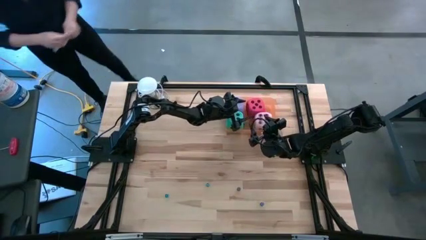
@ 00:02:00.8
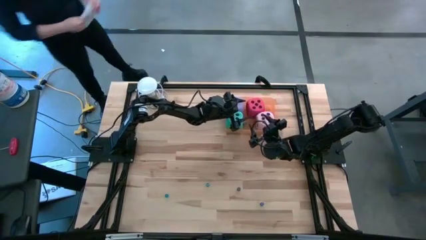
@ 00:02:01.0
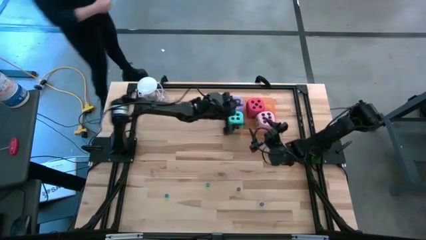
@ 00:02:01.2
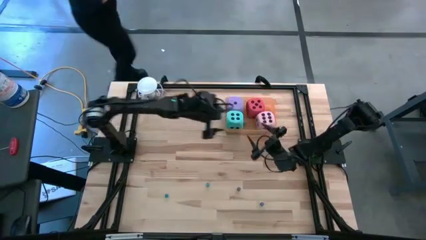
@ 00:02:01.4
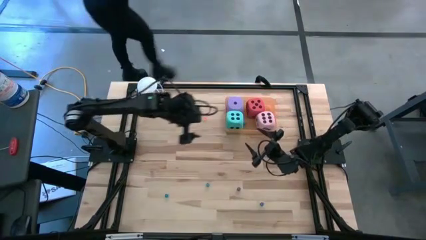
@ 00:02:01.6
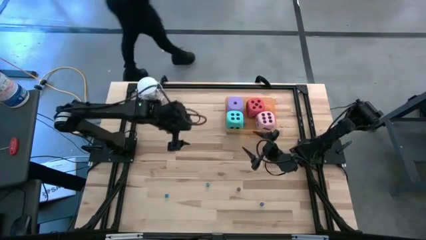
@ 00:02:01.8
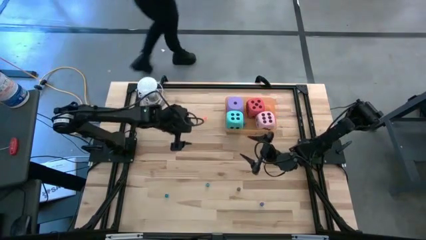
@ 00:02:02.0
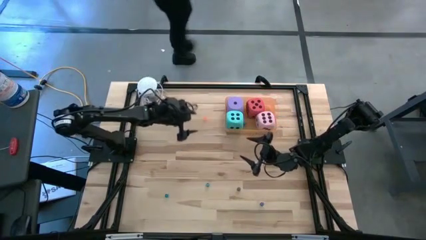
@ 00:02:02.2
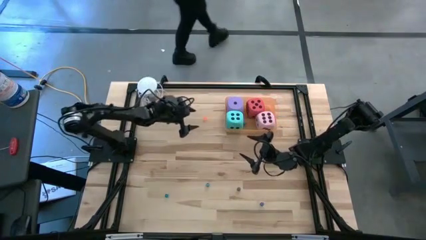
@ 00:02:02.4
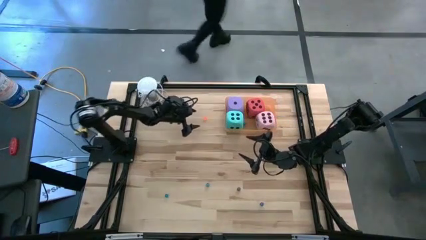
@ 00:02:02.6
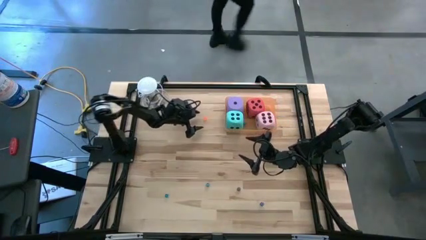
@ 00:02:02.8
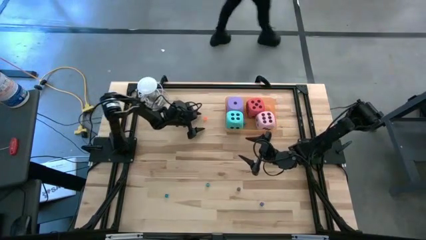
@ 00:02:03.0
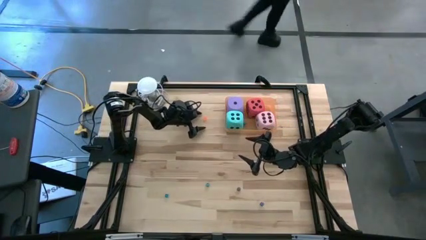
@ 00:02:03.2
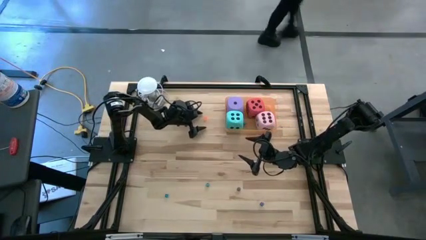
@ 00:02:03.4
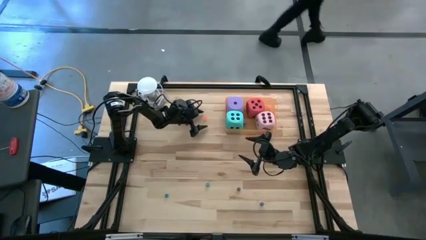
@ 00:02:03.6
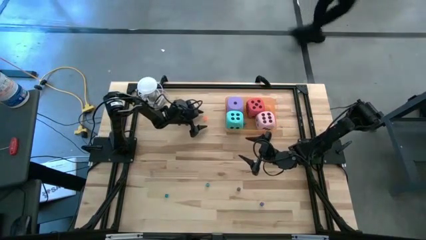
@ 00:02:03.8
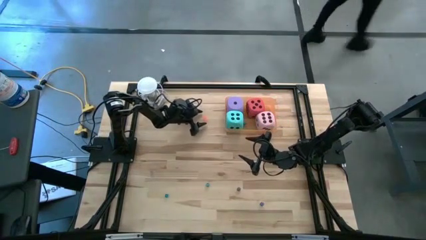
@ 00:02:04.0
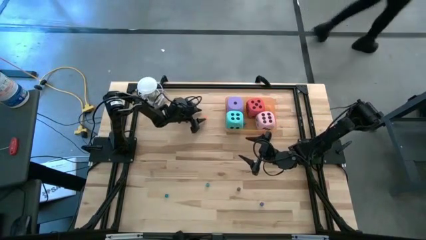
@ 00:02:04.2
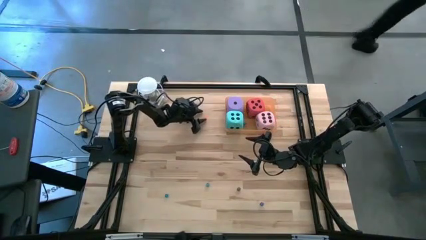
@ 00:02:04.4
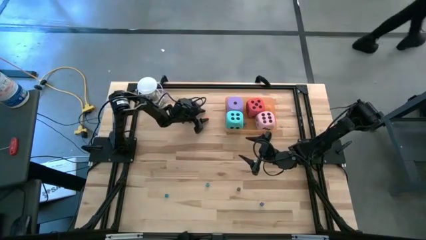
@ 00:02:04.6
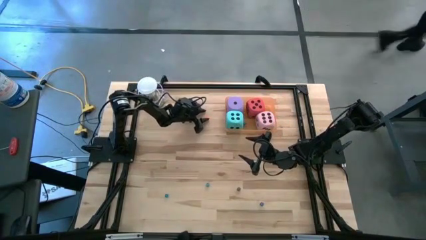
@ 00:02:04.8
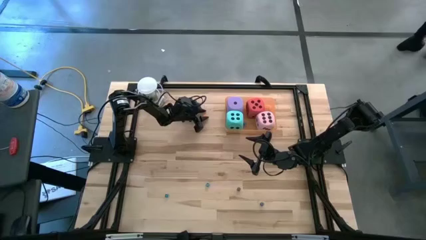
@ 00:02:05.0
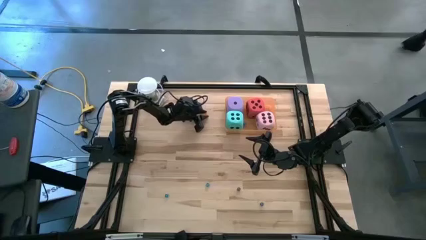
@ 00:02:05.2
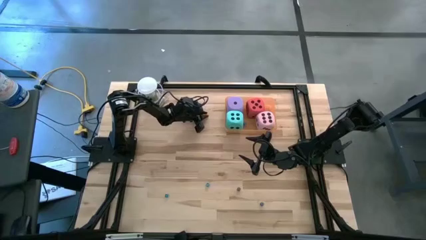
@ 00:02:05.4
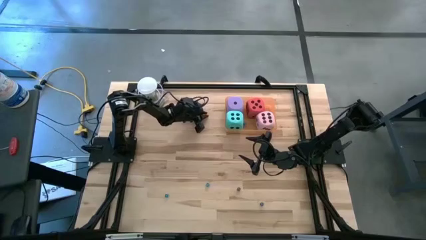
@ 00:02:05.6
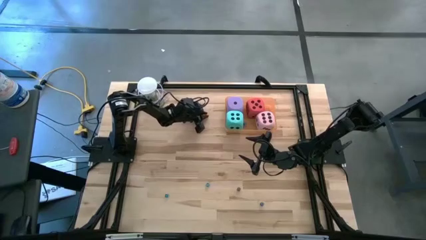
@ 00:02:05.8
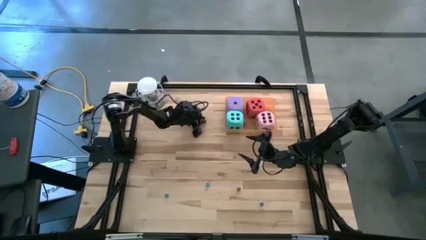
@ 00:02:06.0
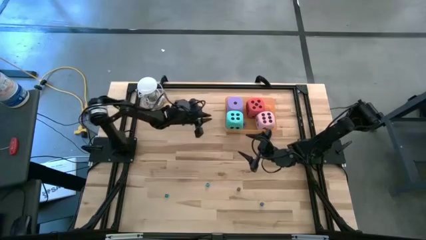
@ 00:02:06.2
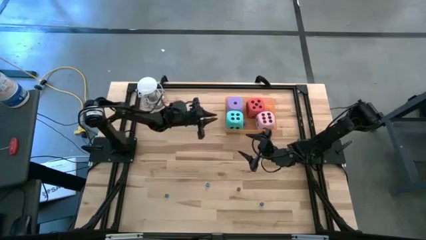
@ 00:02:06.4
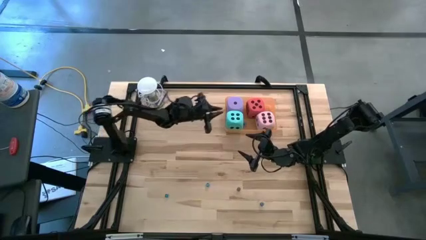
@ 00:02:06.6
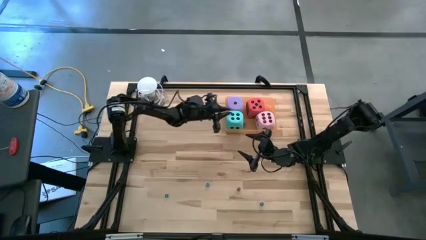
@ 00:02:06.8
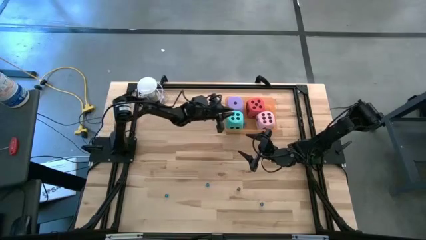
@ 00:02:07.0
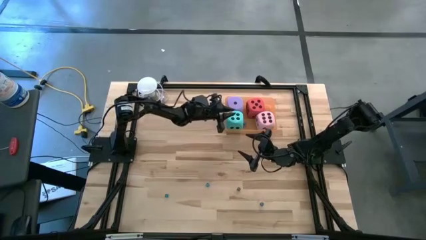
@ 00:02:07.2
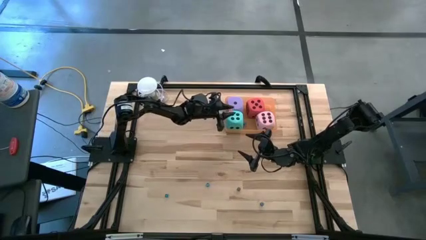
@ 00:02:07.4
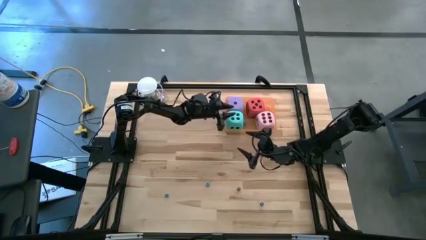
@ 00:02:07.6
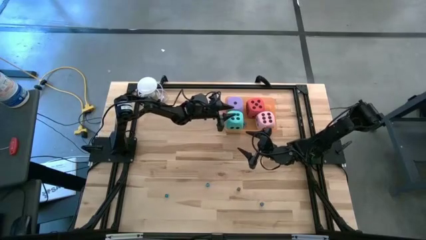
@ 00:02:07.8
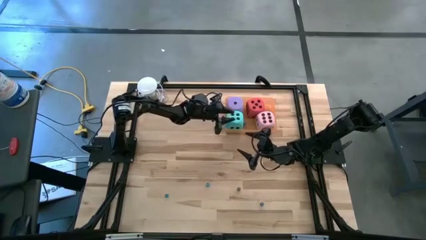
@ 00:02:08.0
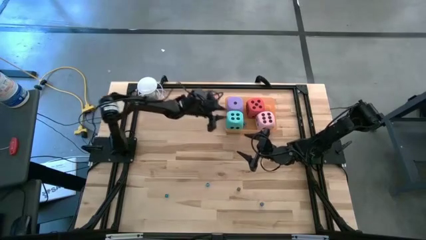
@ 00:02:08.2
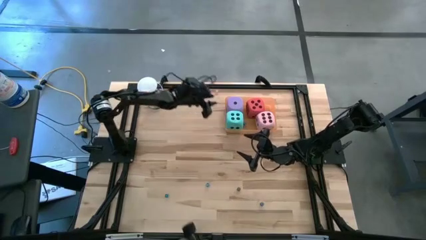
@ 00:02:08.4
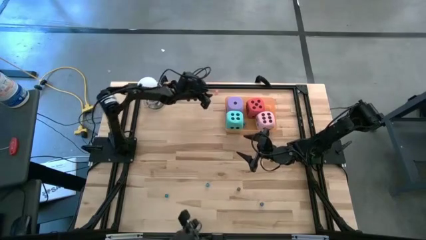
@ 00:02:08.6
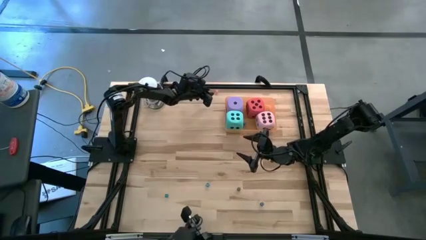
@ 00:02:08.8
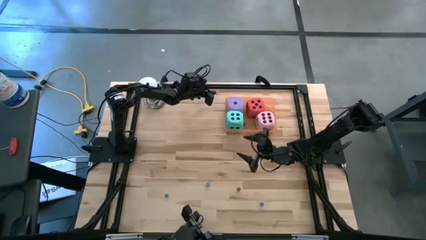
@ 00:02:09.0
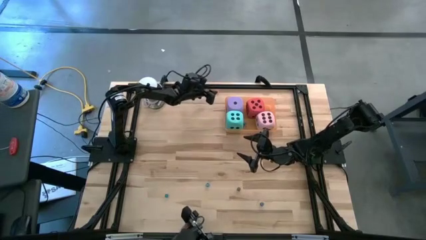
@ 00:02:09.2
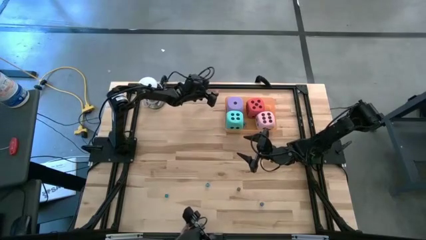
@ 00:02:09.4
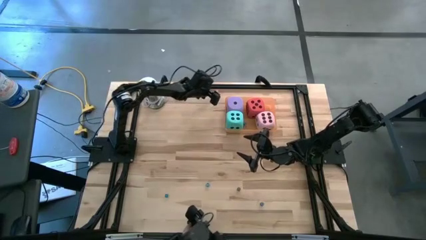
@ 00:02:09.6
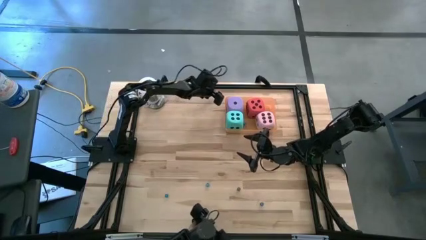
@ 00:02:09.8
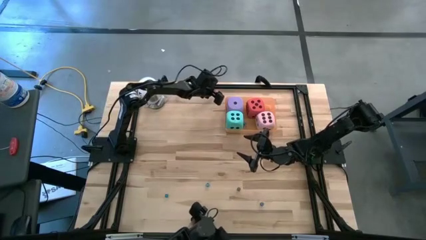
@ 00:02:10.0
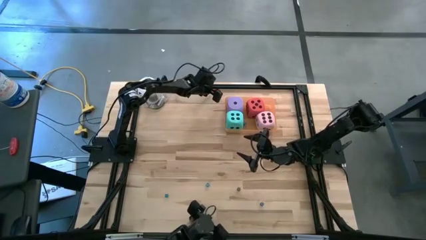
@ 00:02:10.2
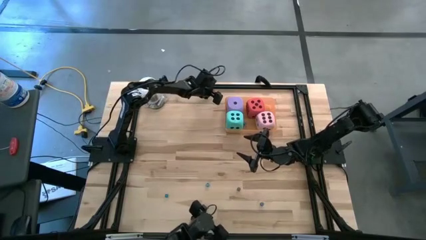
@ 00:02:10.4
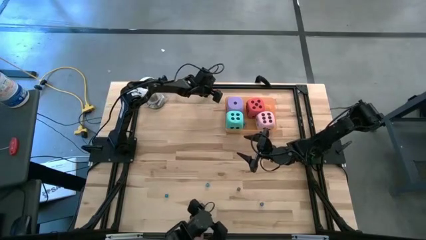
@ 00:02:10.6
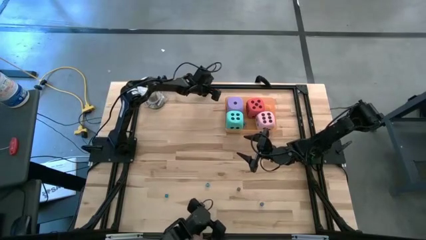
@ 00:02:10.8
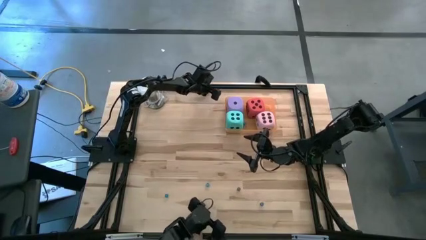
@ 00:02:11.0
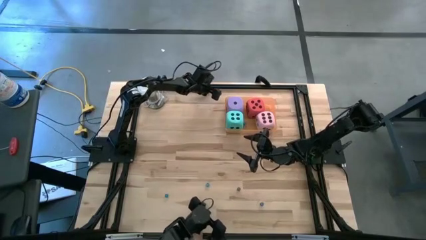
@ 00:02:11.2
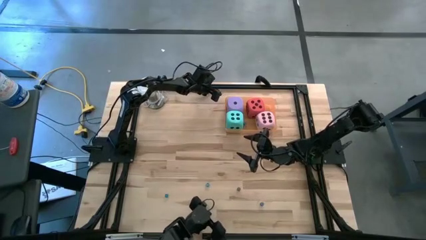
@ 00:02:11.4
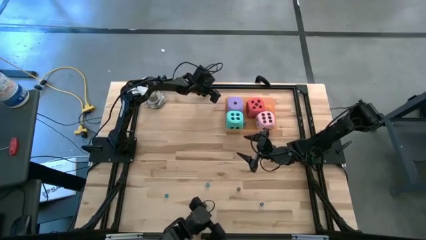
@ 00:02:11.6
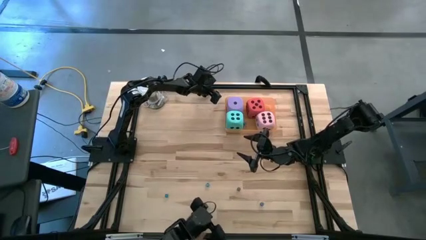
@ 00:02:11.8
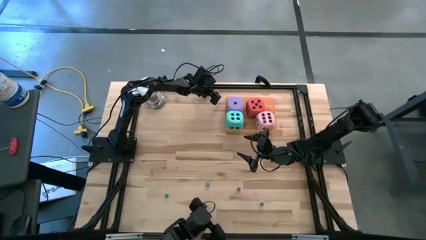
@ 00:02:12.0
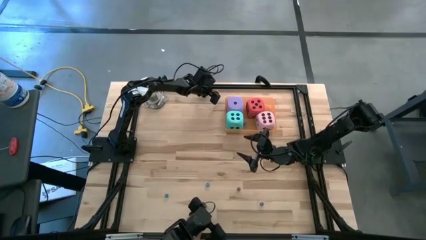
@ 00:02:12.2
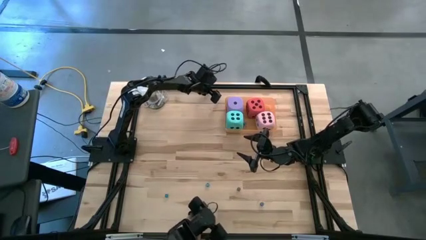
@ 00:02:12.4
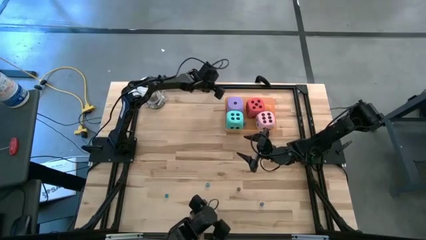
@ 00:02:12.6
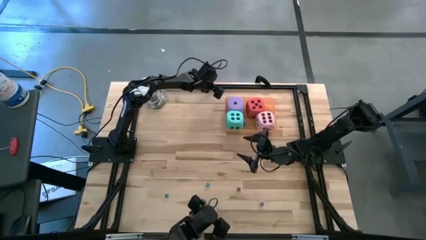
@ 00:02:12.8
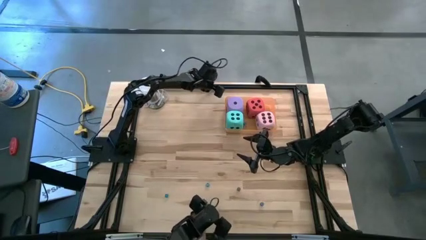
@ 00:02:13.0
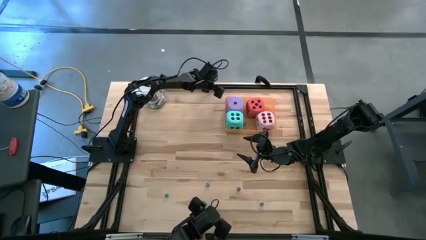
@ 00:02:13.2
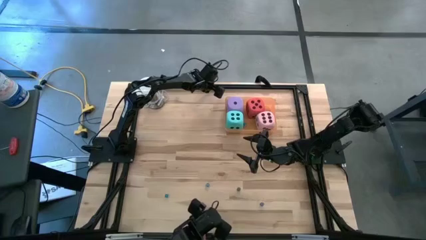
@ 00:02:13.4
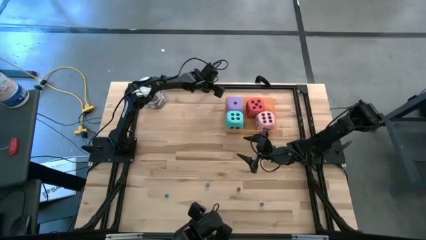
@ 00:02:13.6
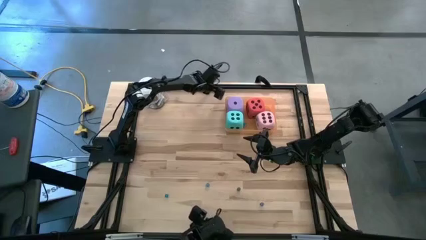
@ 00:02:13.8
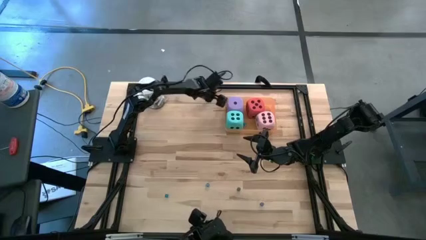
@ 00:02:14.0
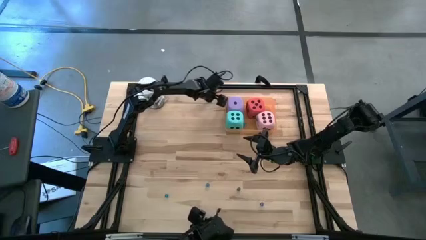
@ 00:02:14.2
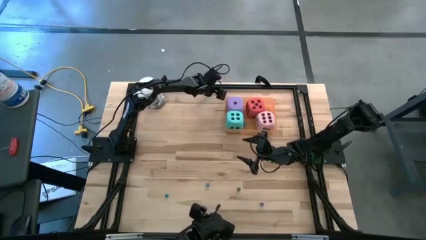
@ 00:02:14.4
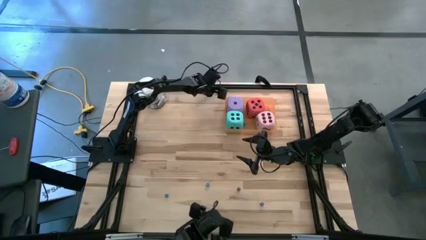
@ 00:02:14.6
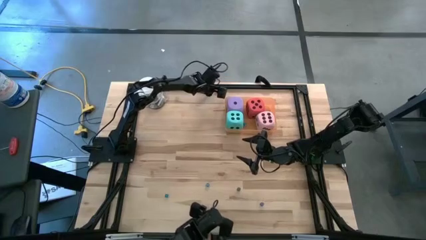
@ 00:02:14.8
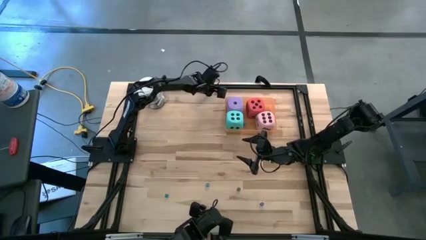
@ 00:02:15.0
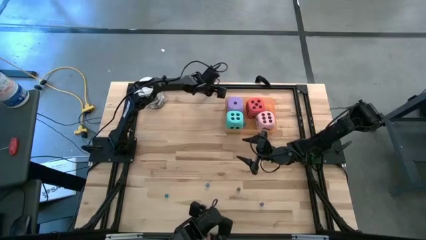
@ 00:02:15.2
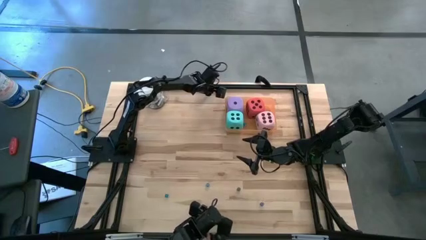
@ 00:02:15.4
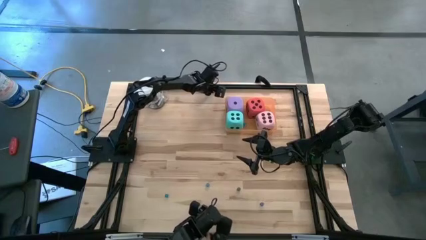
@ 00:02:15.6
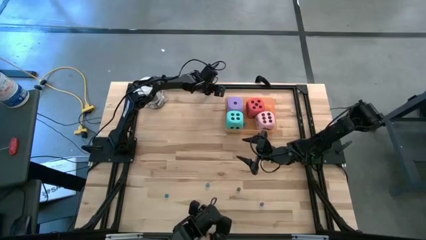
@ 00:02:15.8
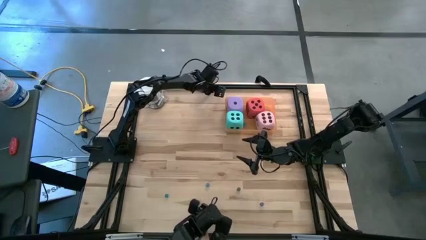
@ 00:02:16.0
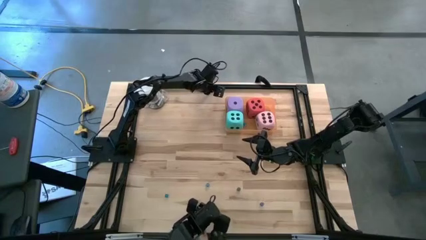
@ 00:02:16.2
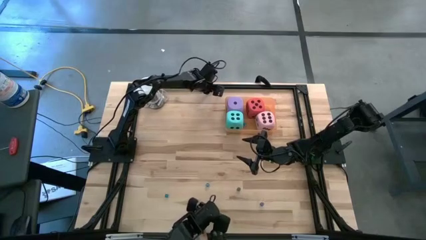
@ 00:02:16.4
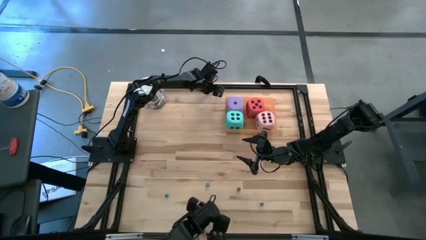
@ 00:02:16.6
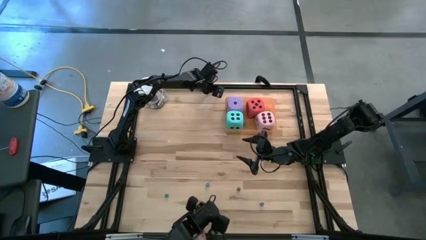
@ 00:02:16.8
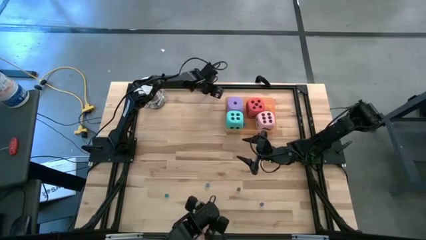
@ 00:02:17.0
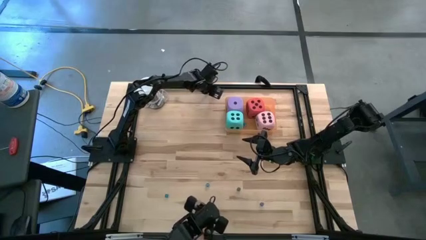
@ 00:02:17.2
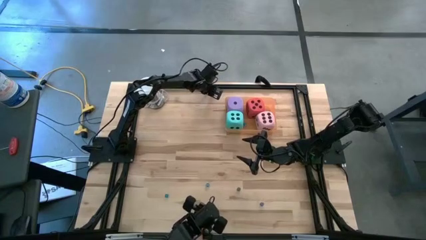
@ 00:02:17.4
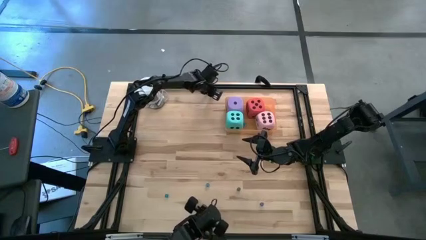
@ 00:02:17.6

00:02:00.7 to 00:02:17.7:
Task: Pick & Place Dice
Put the small orange die into the the orange bin
